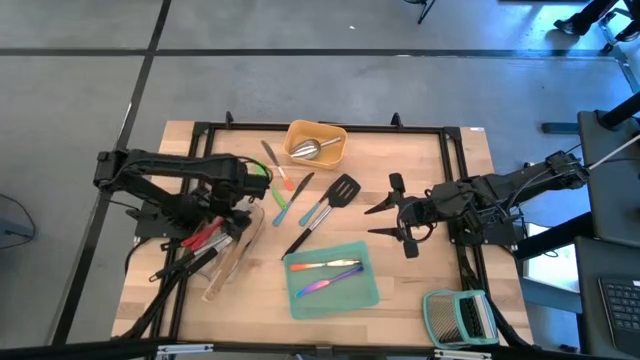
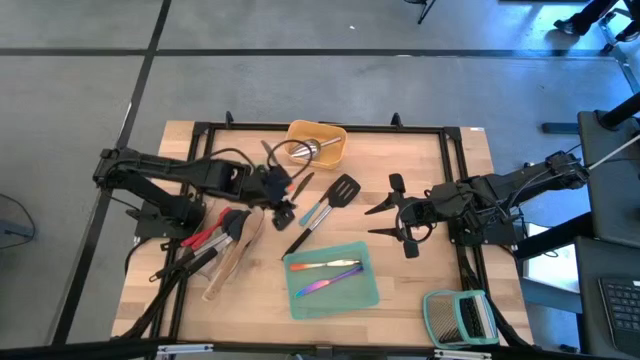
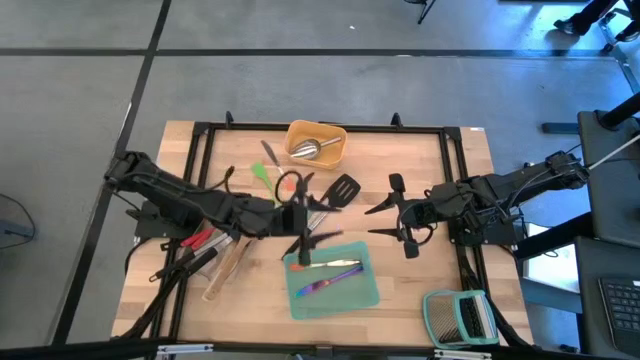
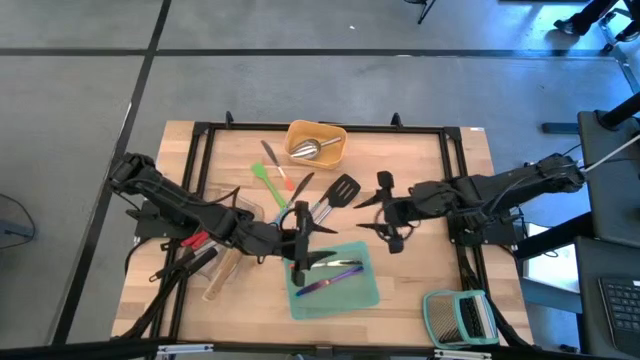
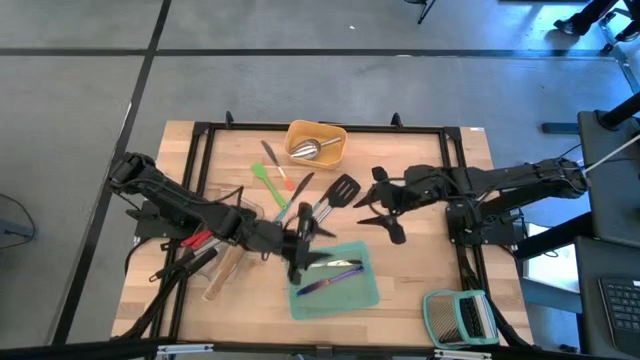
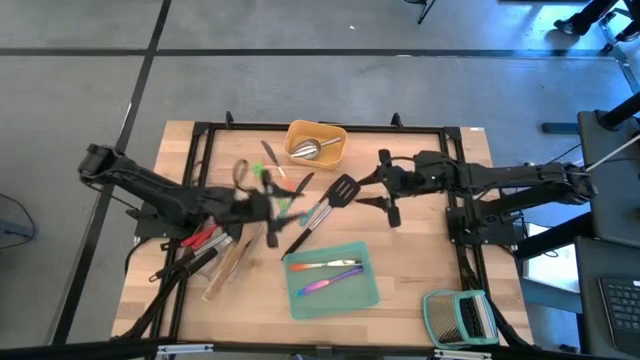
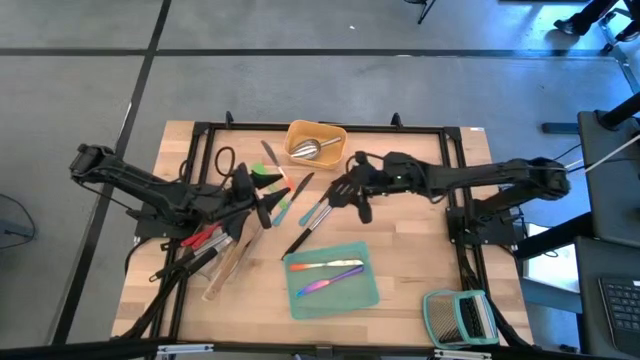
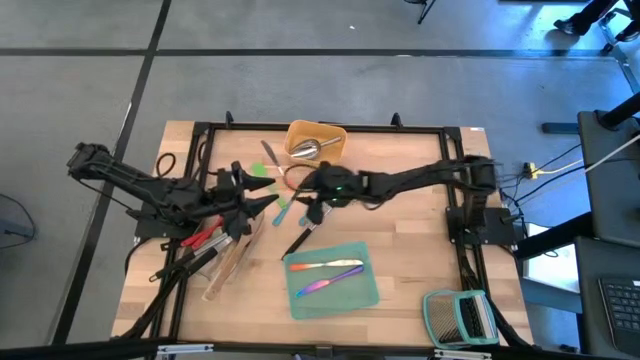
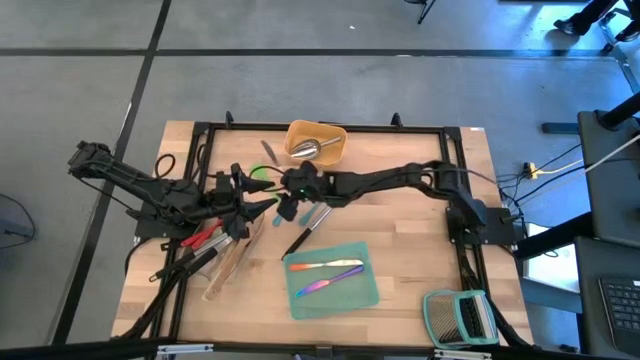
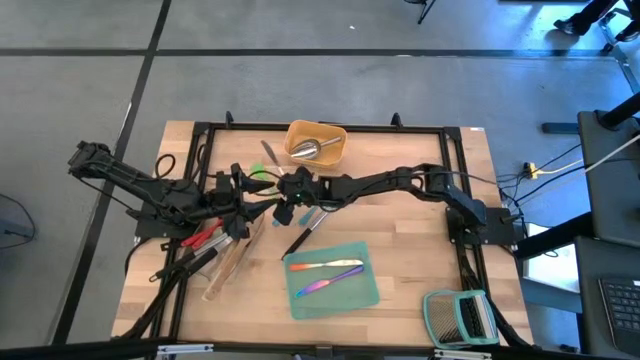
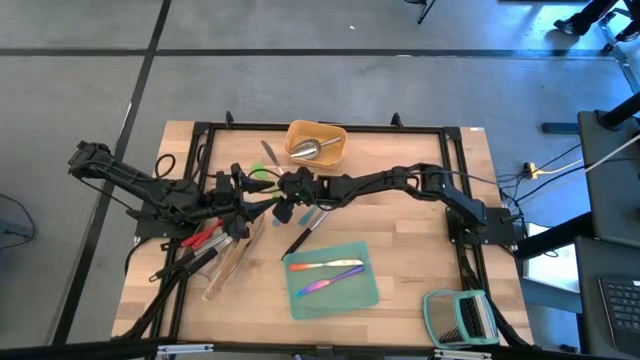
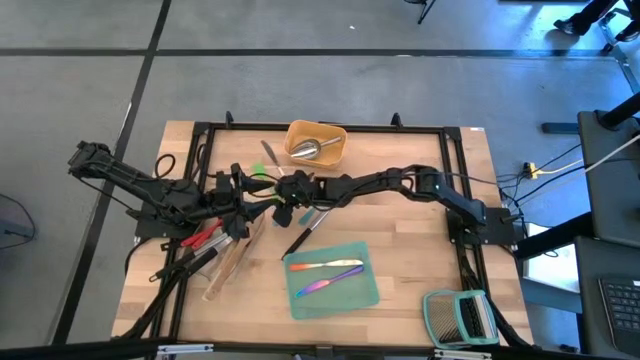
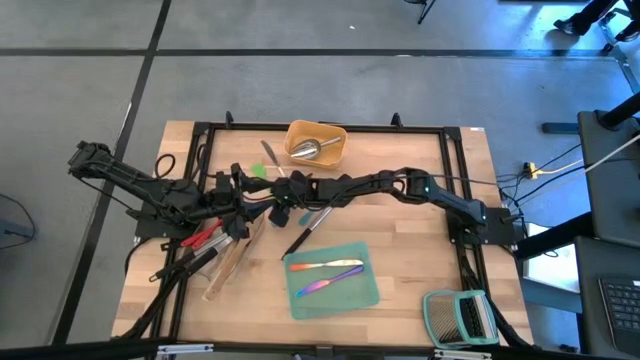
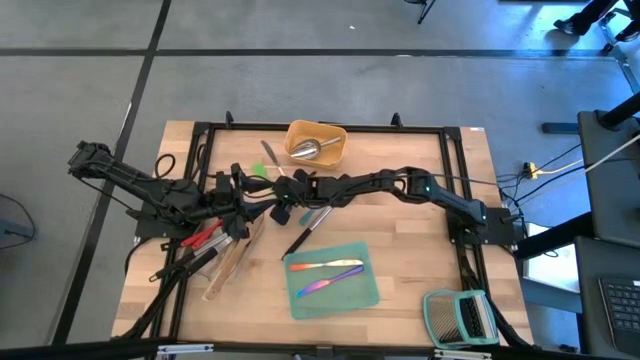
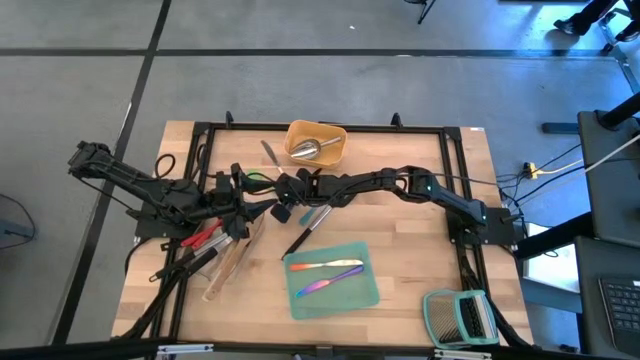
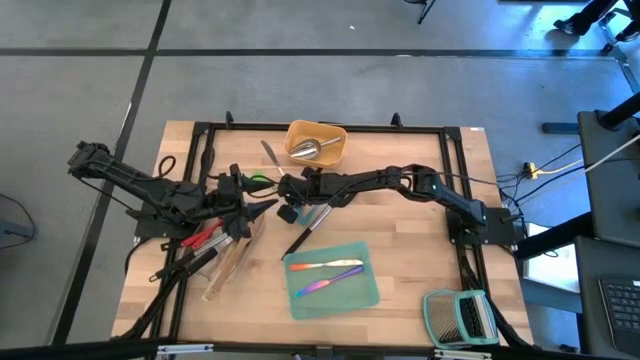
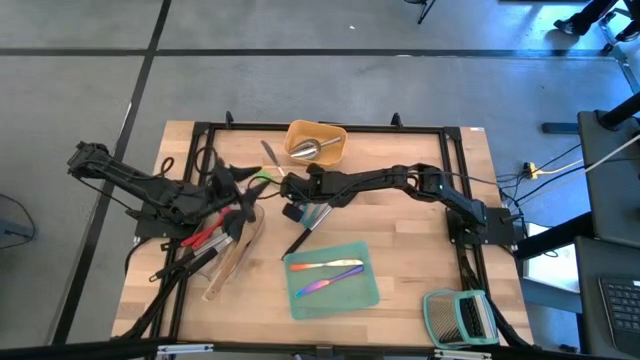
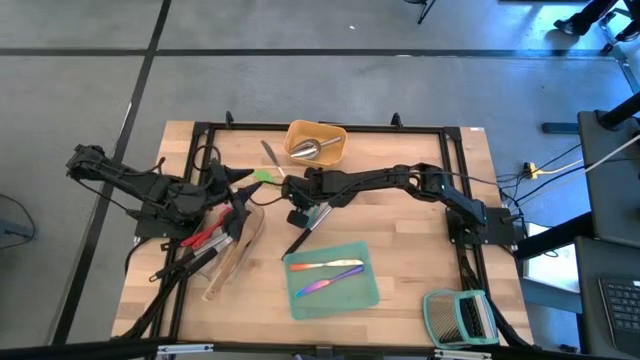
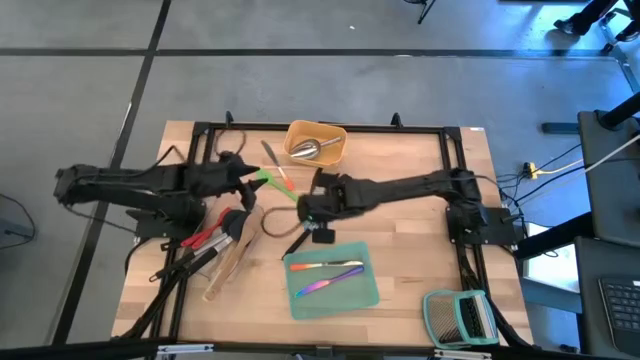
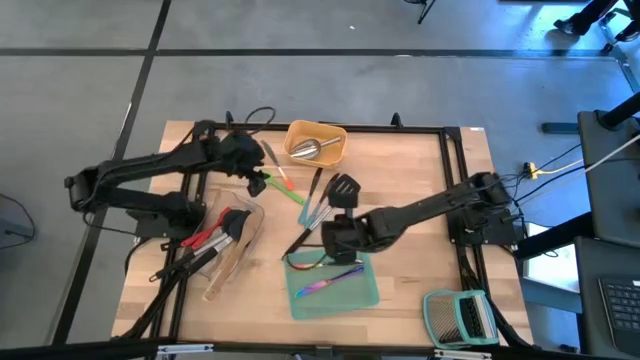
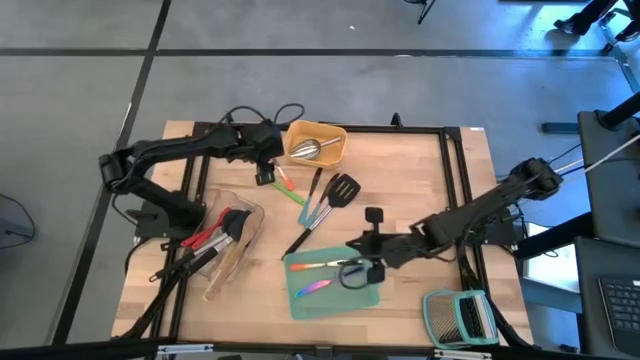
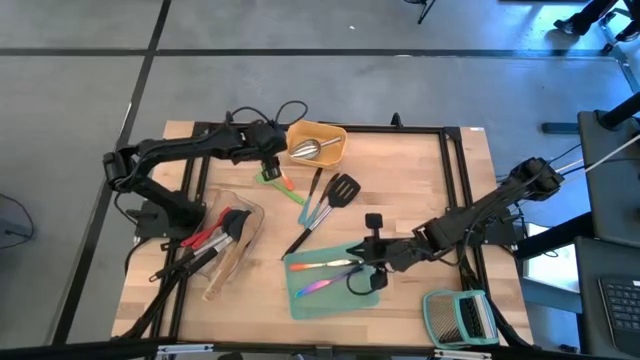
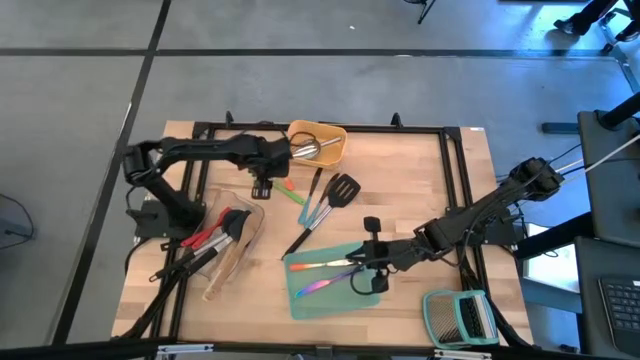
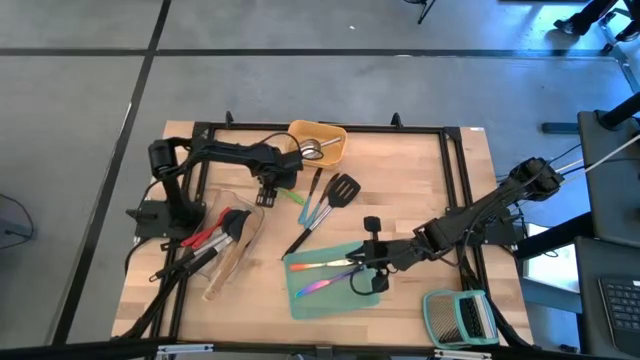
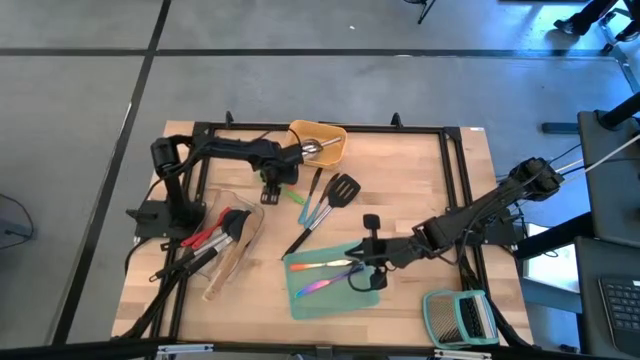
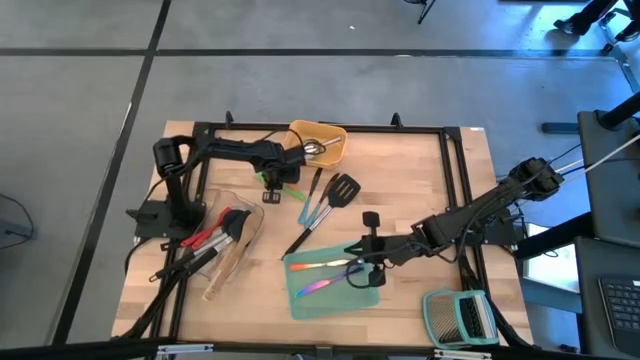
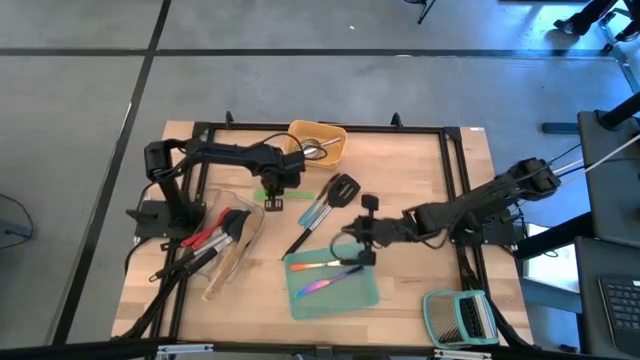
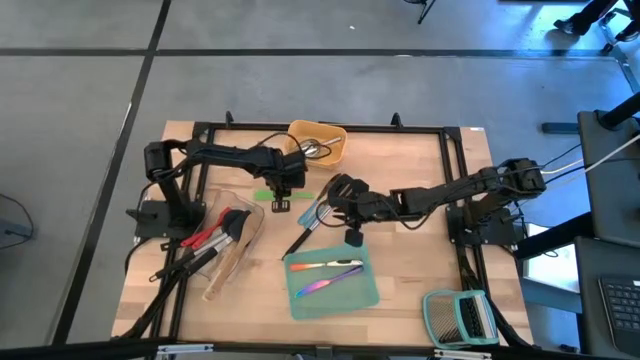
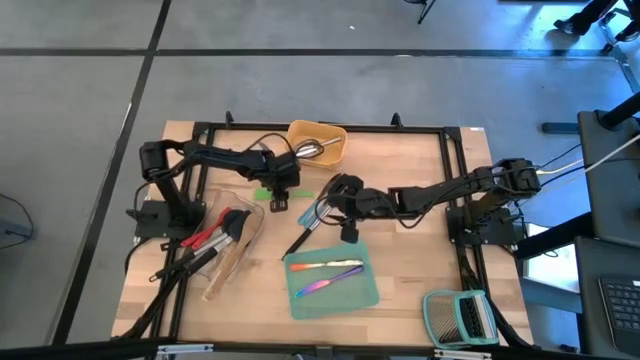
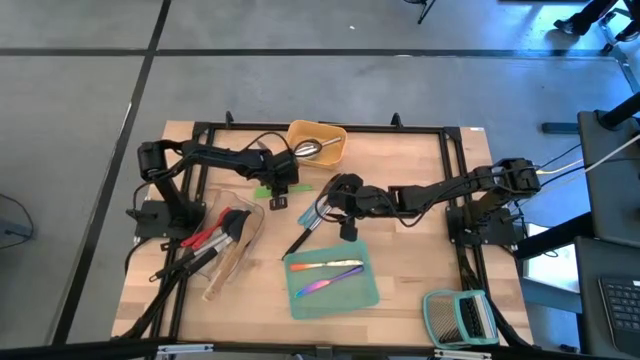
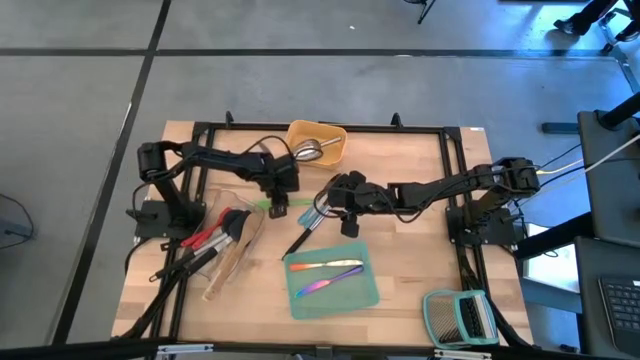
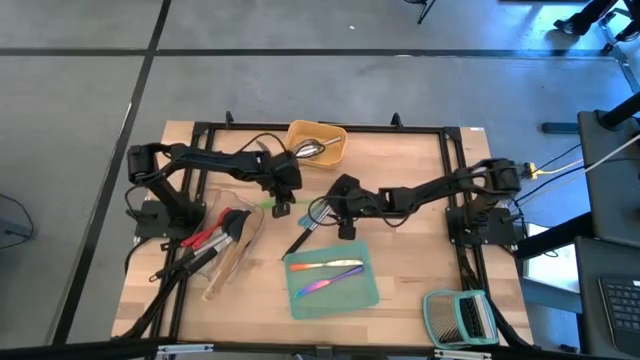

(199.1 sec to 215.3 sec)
Task: Pick & Place Kitchen Items
Put the green spatula into the transparent bin

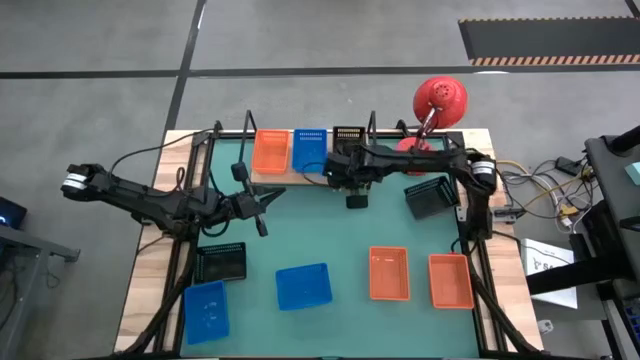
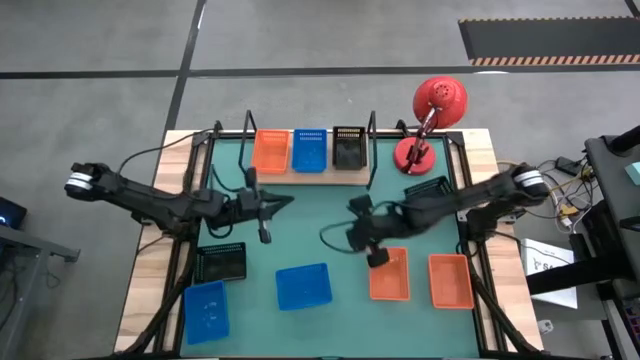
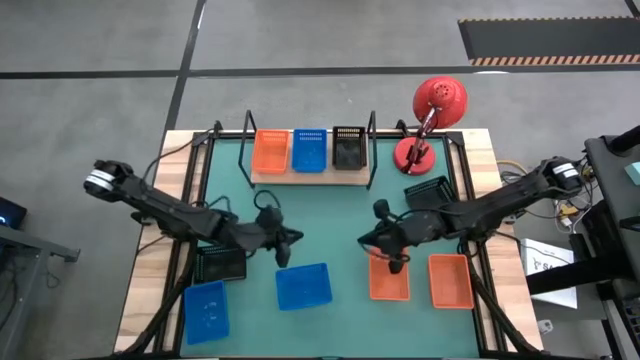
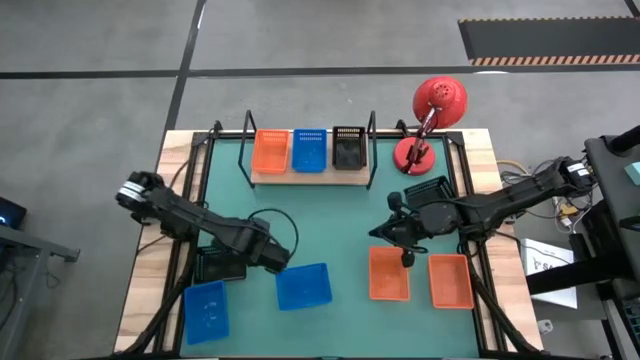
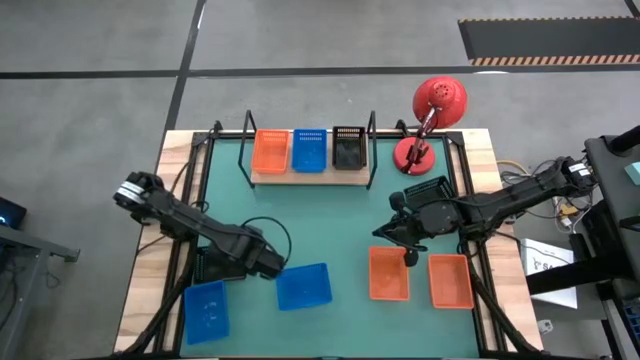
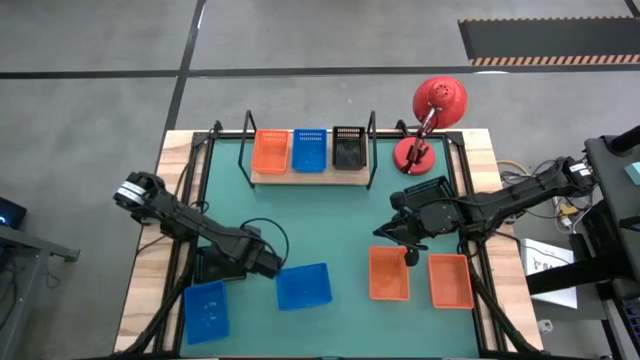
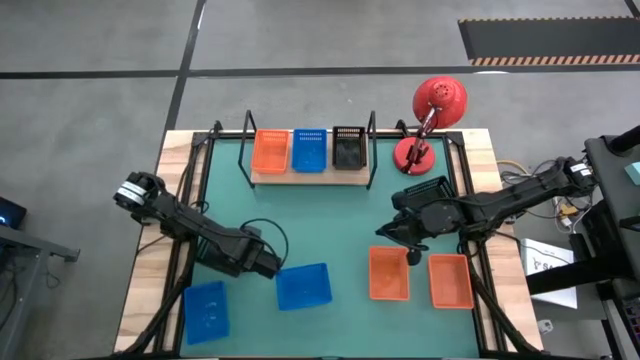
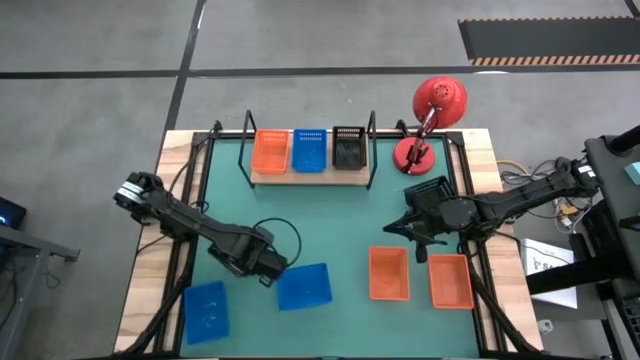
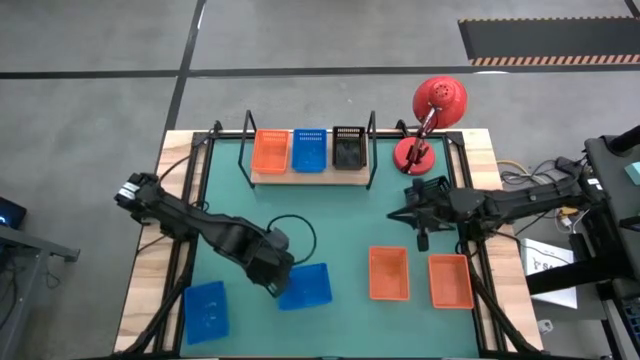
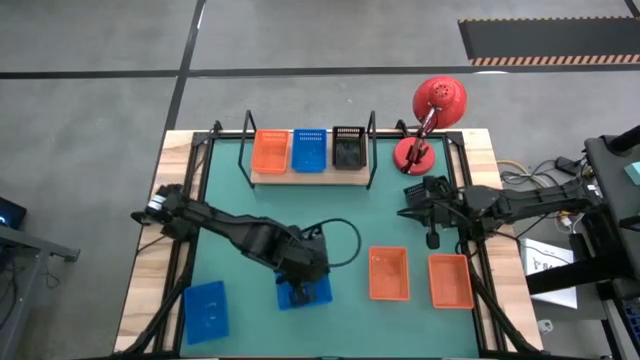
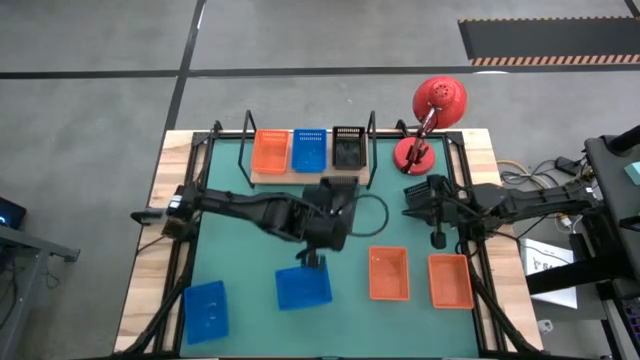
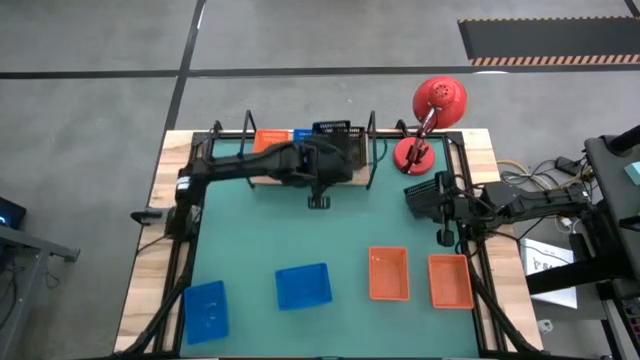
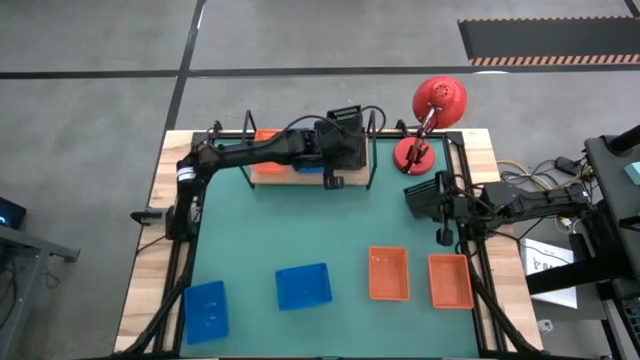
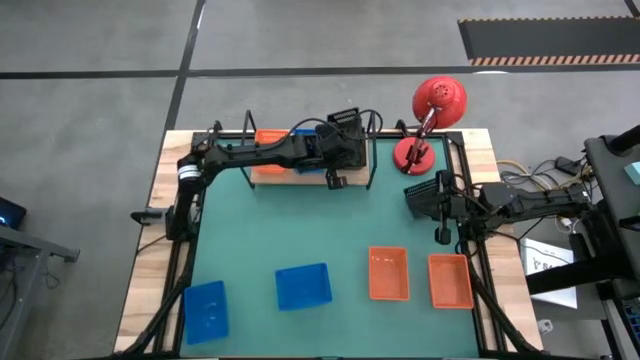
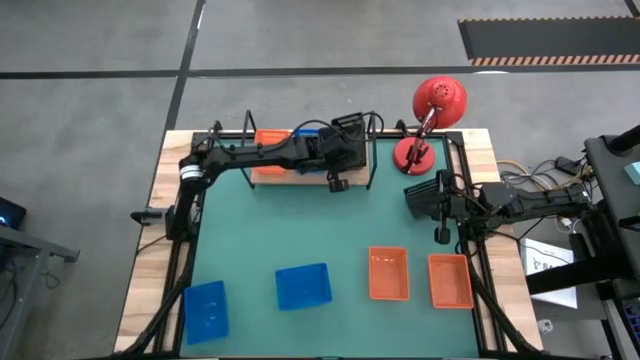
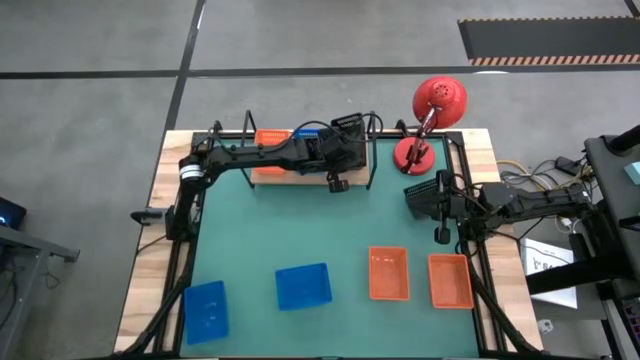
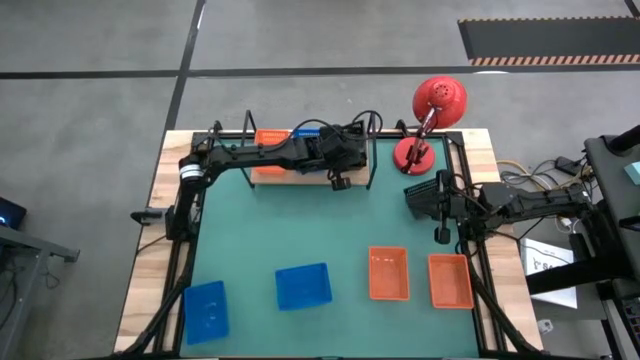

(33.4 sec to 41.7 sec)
Task: Stack baskets on shelf by color
Stack the left black basket on top of the black basket on the shelf
